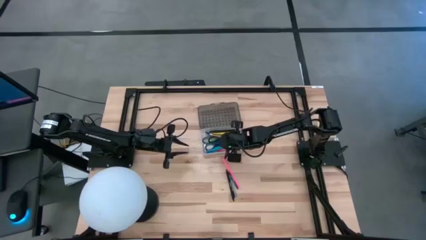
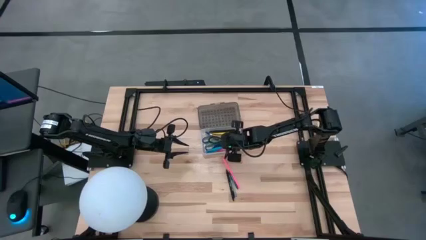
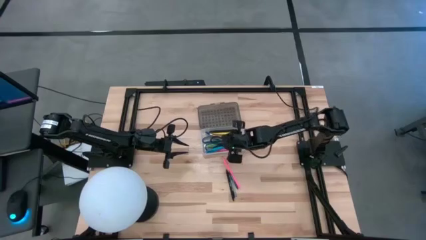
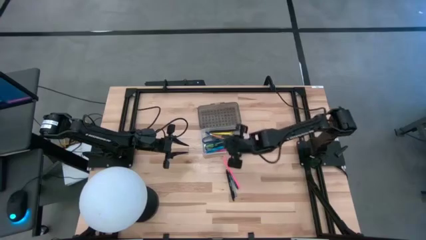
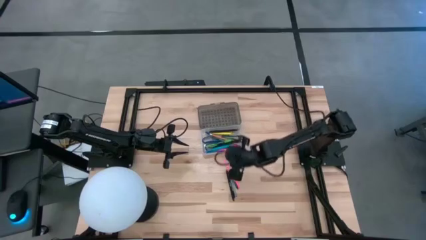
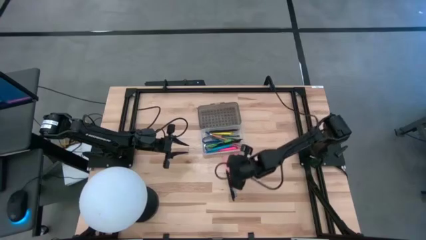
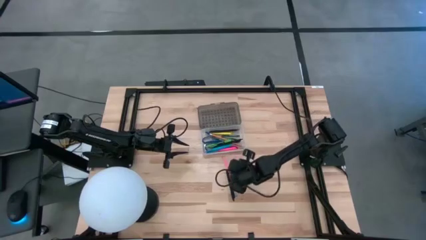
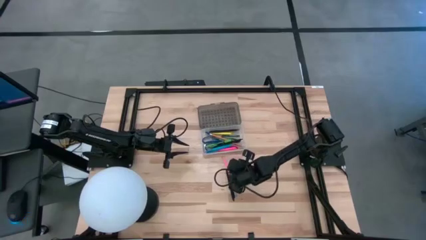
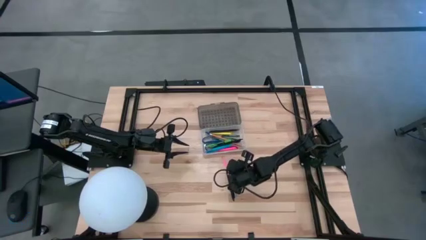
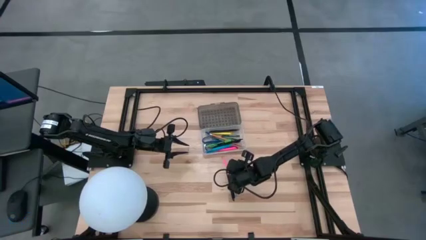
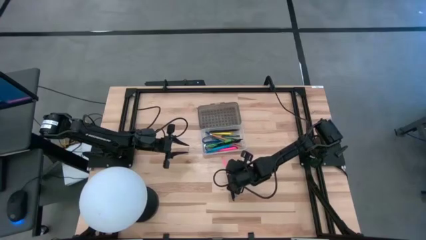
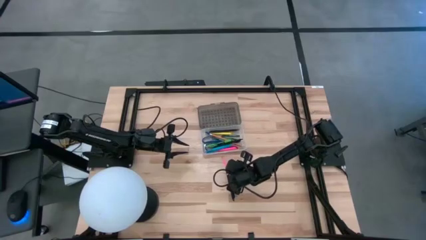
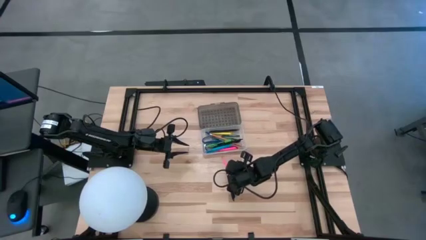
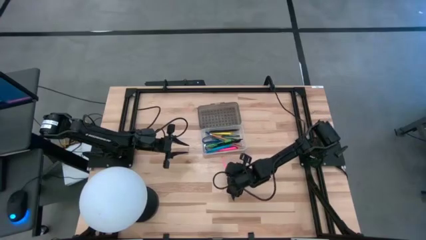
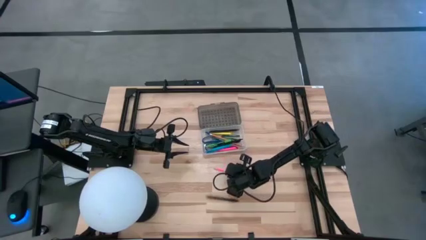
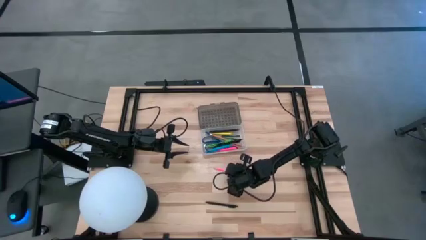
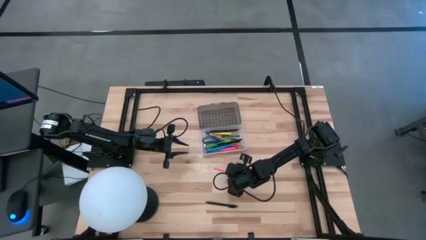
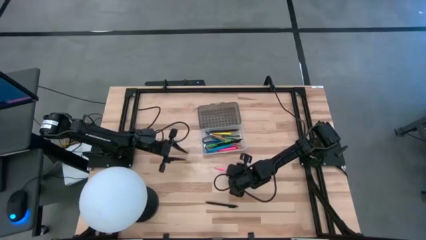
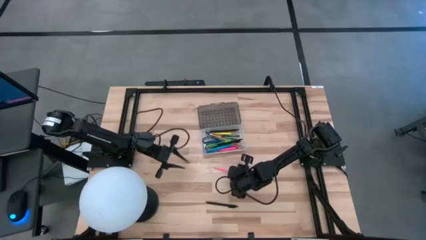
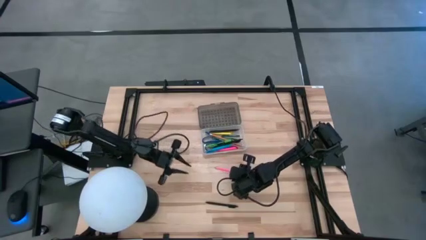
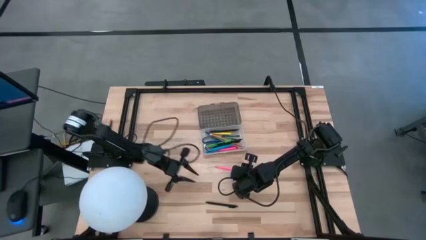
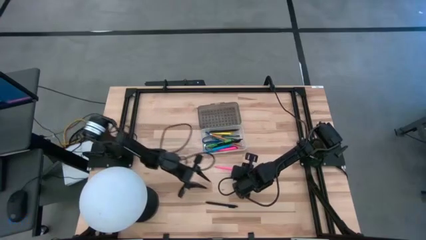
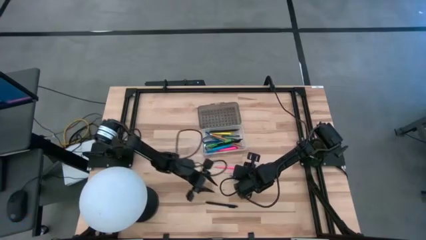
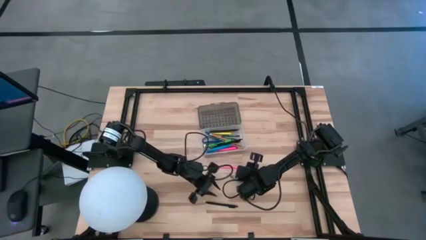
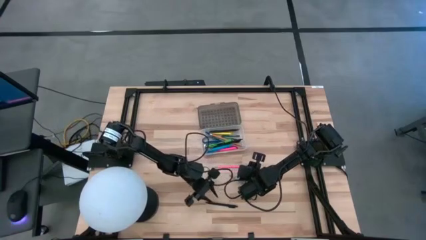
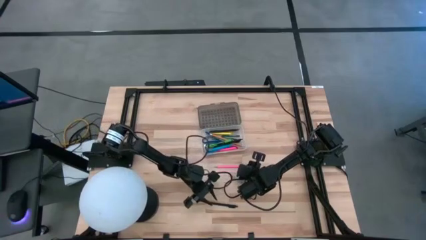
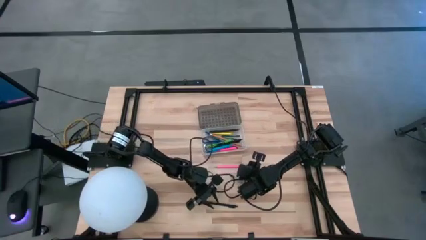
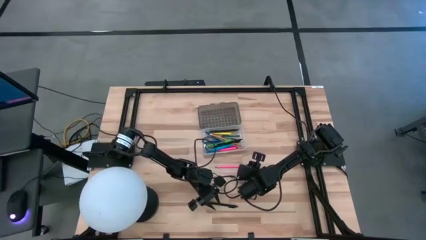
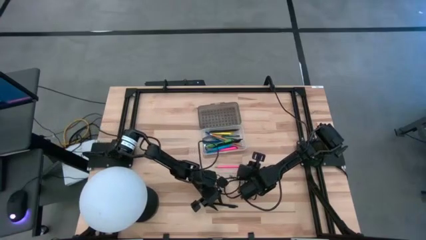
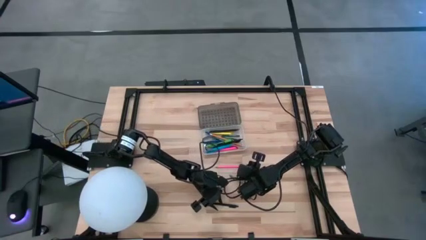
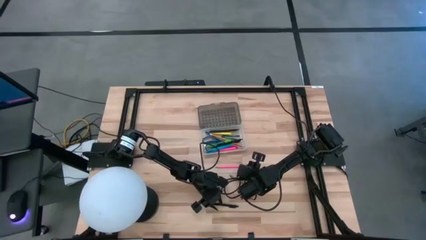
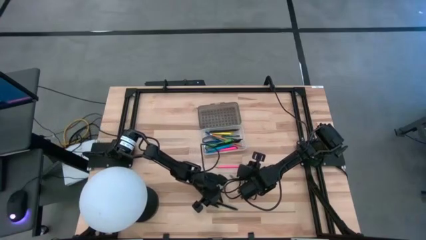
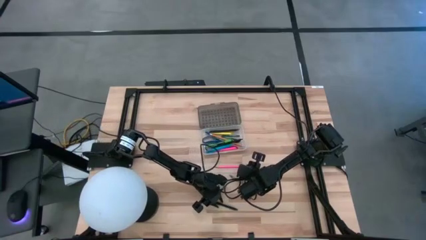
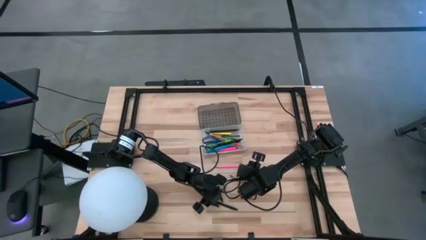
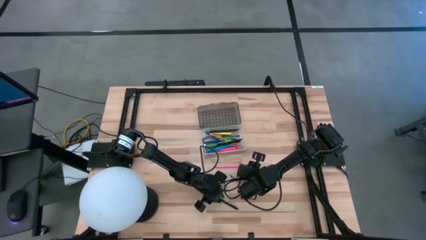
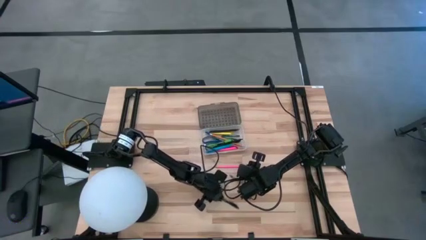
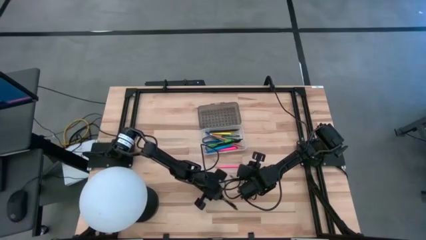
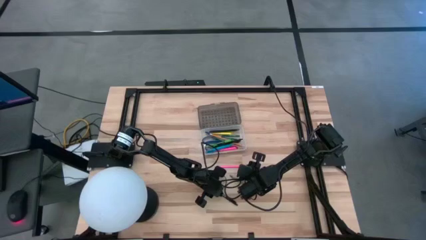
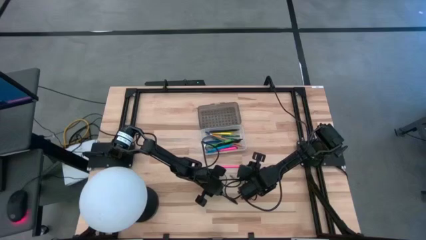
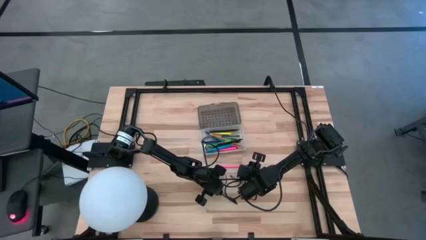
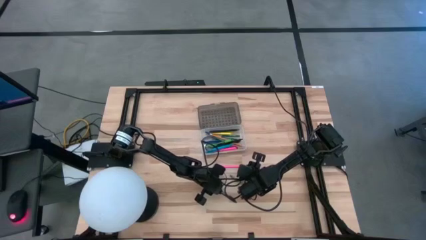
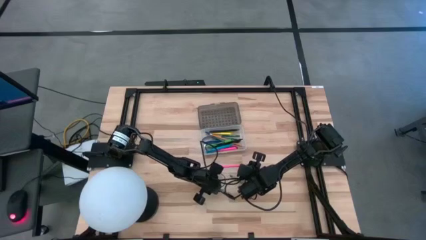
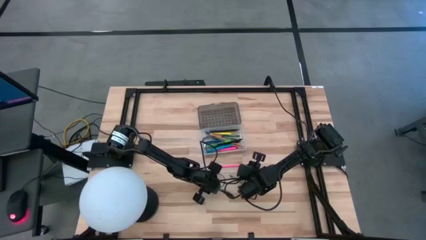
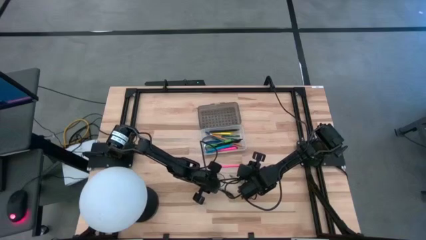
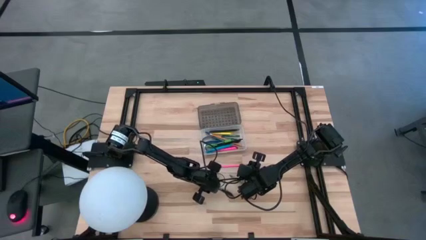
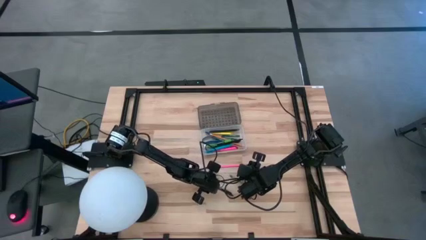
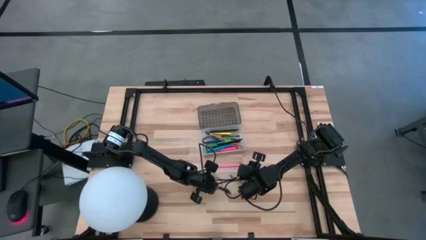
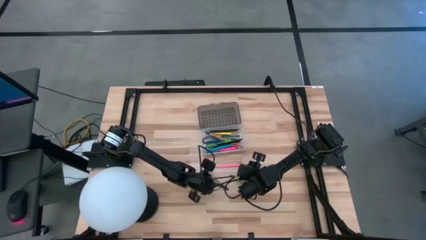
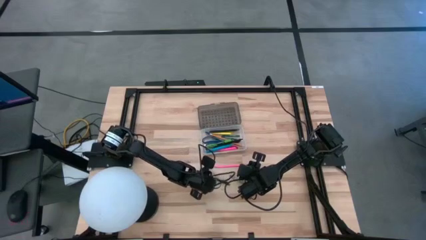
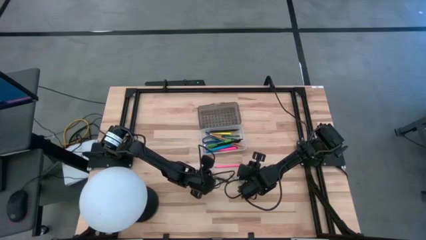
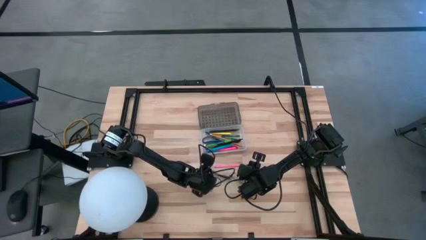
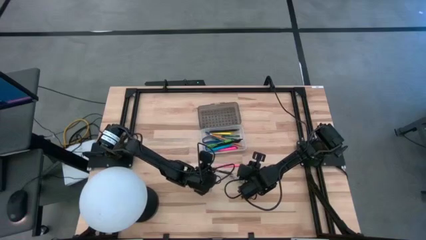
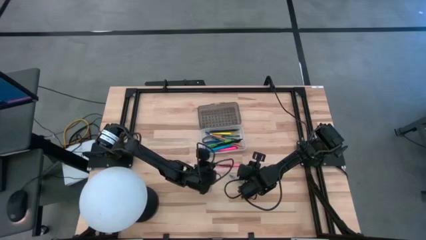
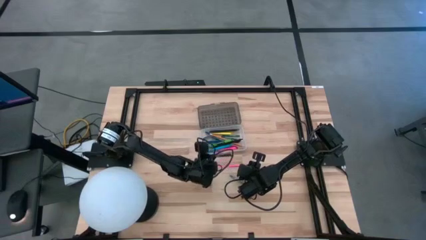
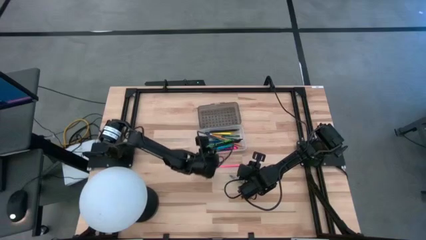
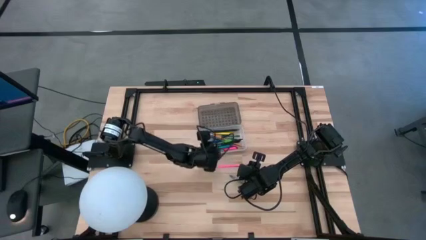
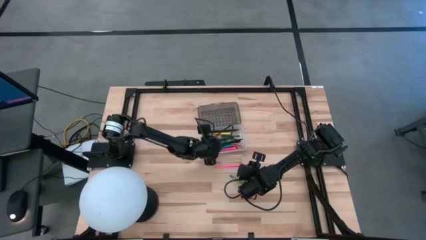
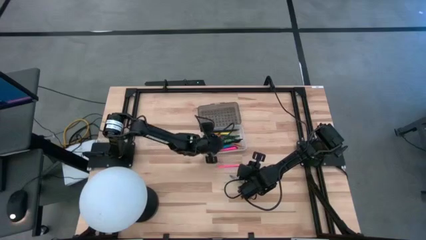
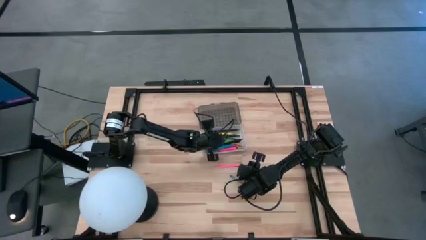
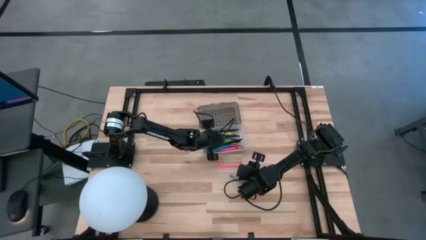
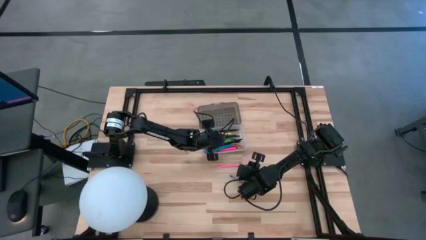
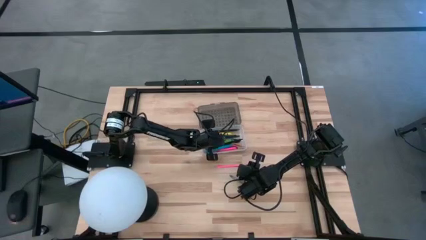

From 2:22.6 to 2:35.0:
Task: Pick & place school supplies into a supply box
Put the black pen into the supply box

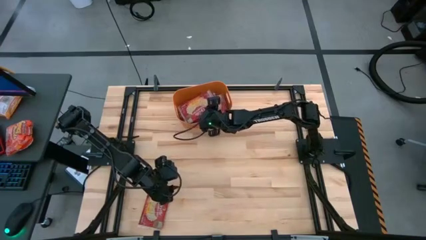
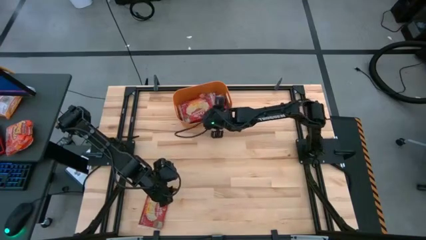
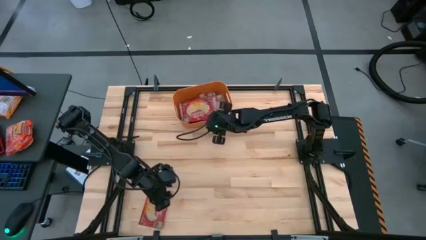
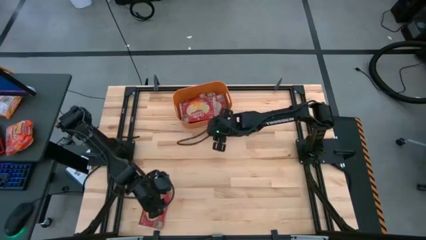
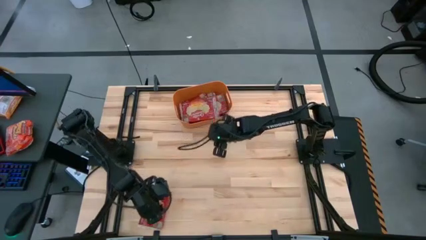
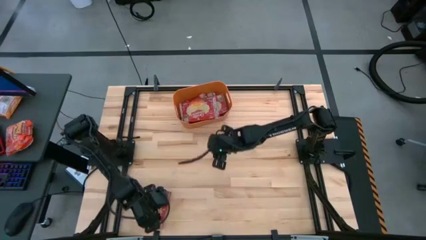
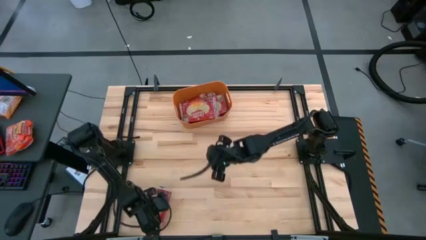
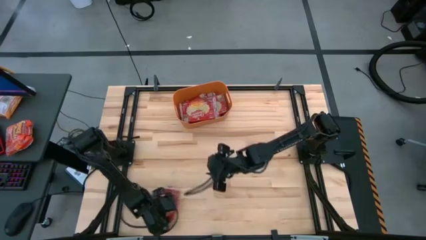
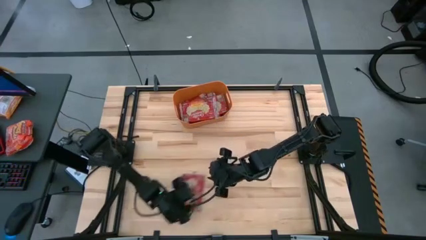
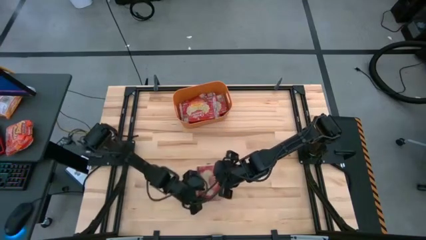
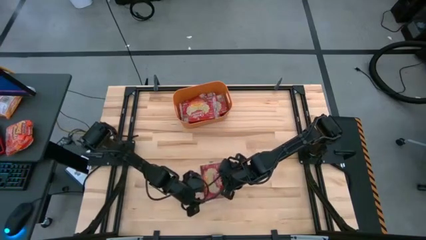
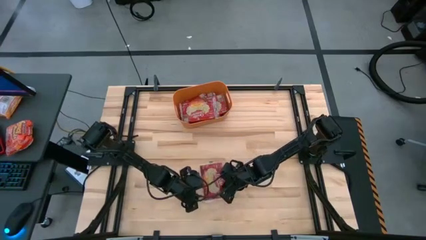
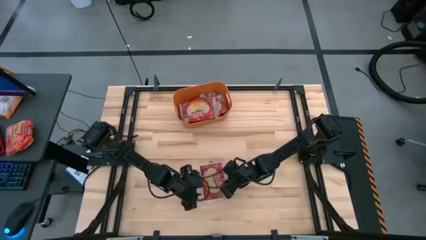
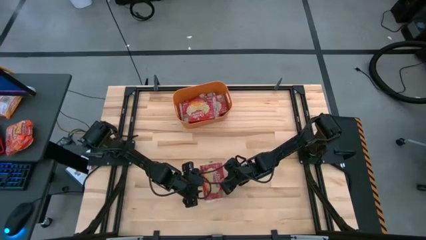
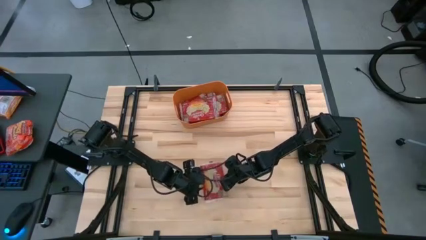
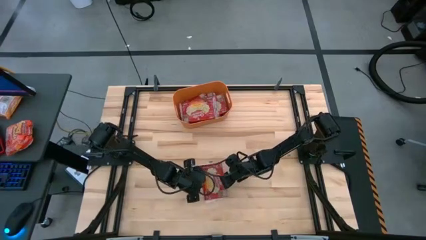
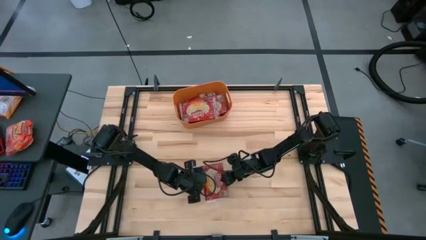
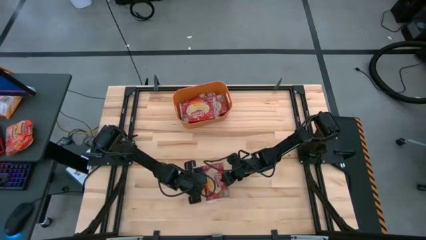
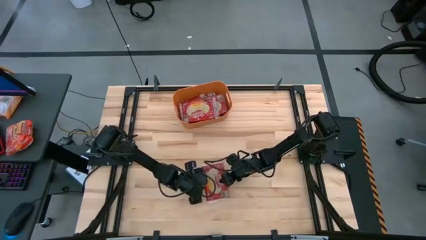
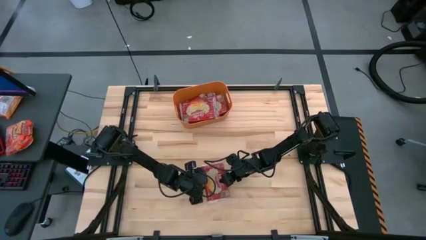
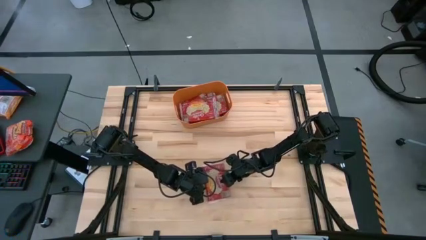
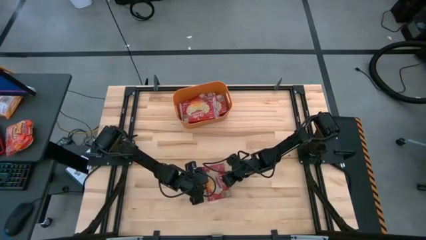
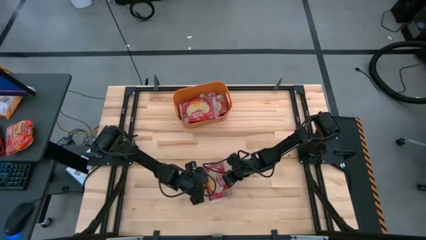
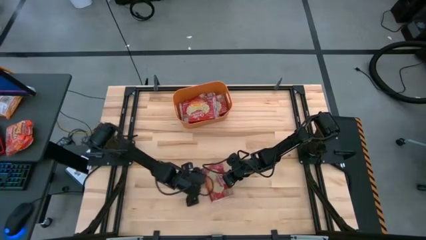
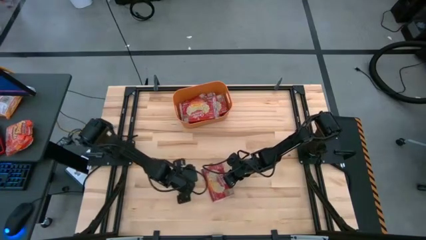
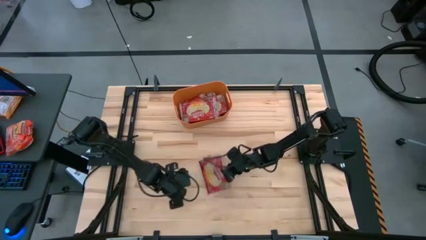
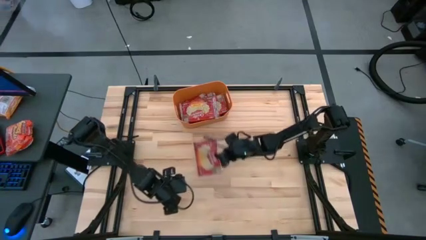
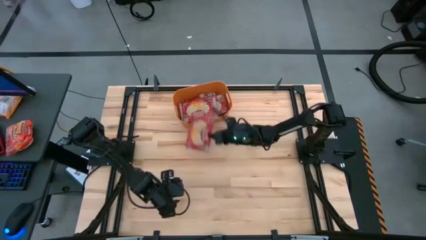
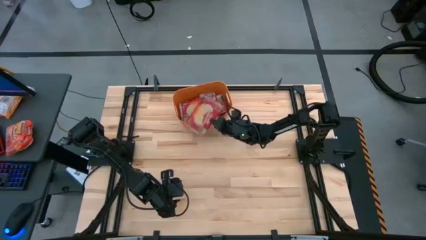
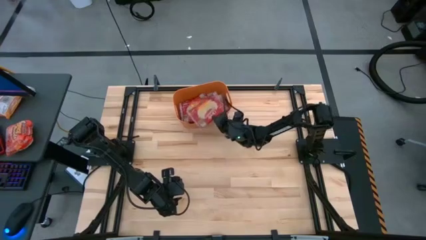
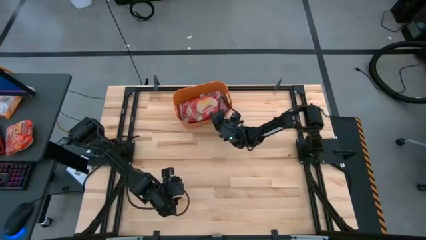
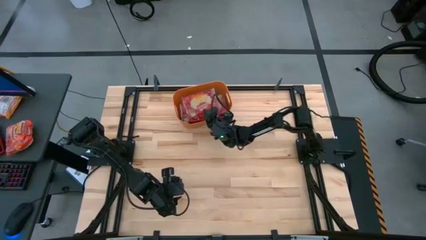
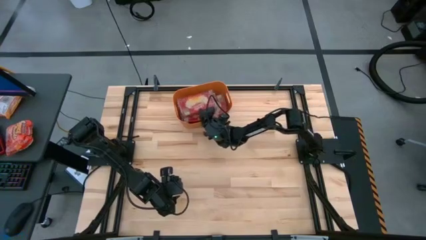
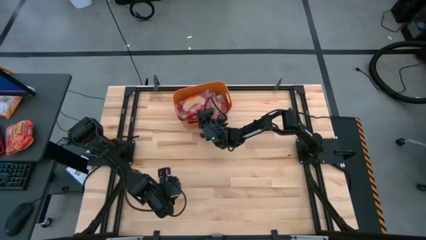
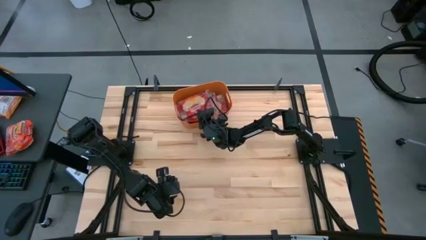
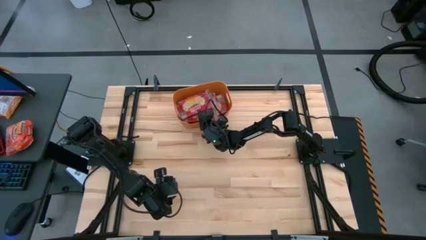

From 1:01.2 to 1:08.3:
Task: Sort popcorn bags into baskets
Put the popcorn pack in the container
